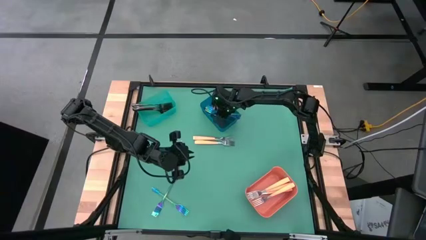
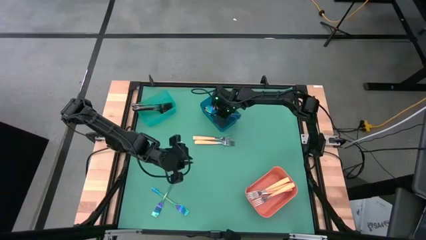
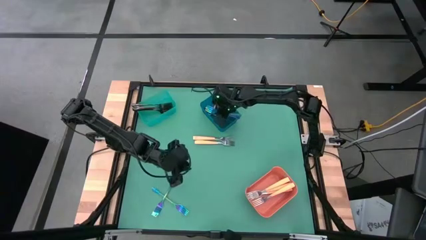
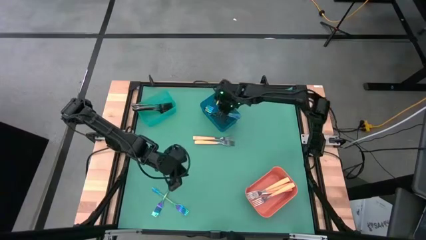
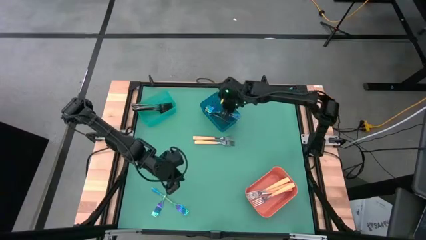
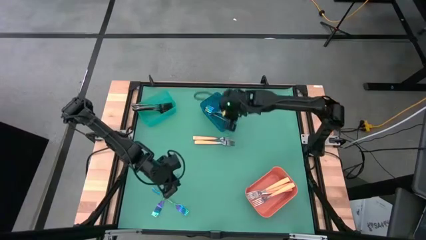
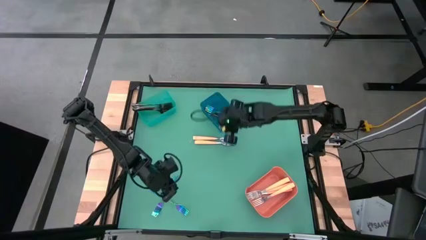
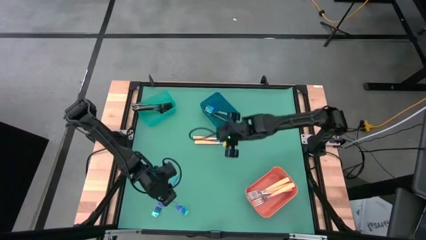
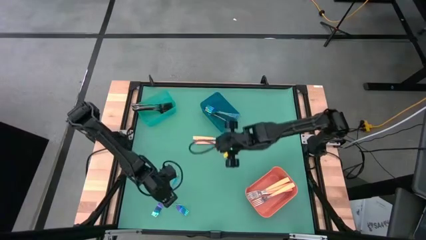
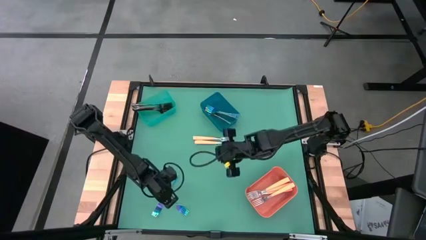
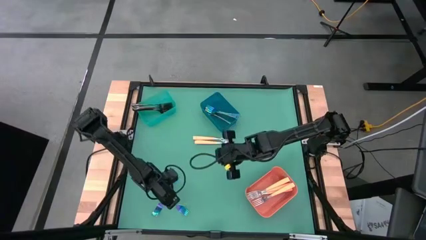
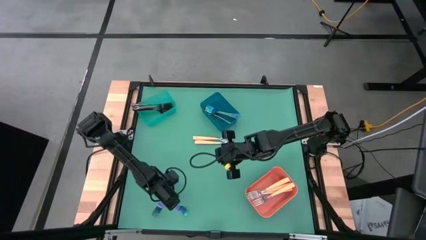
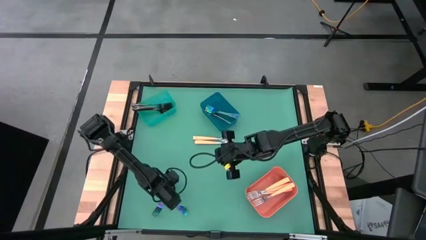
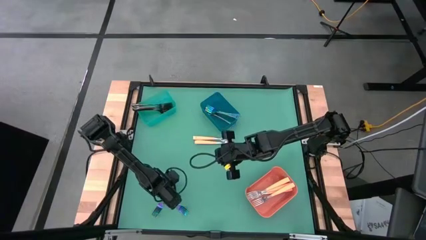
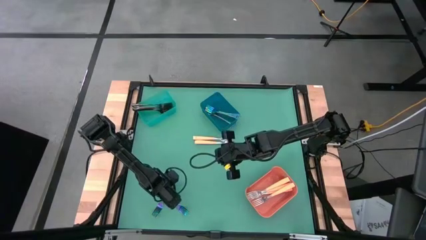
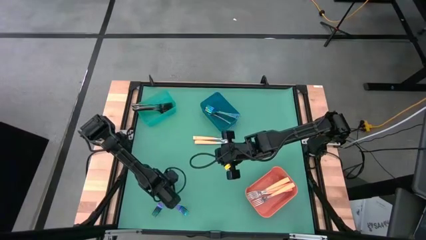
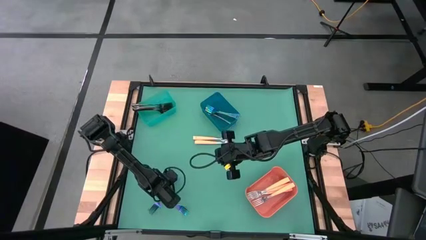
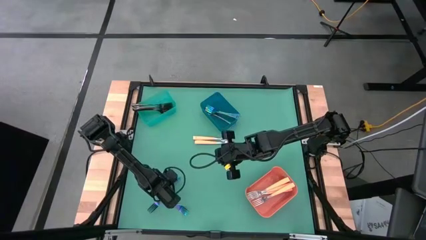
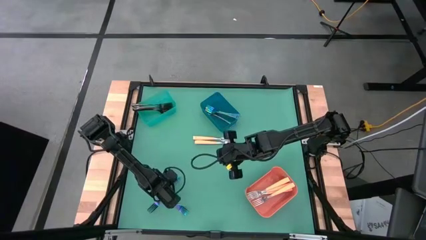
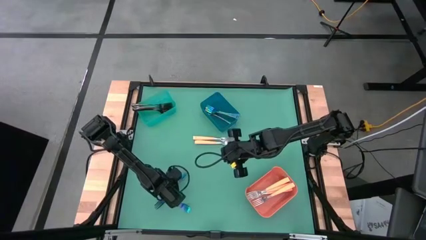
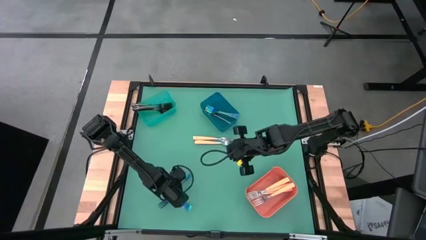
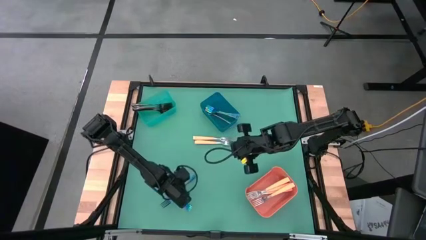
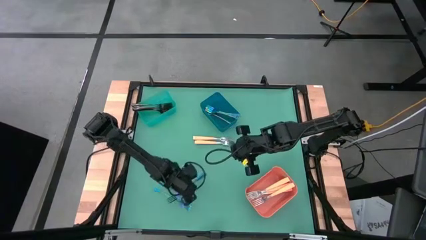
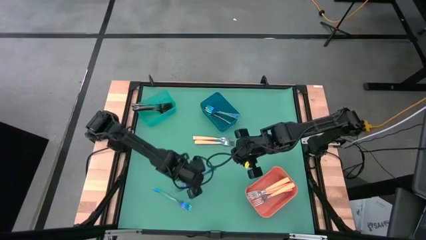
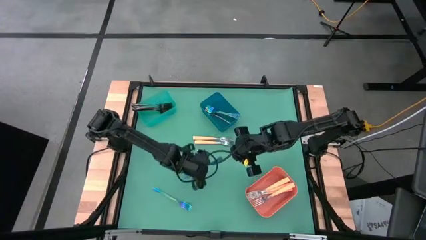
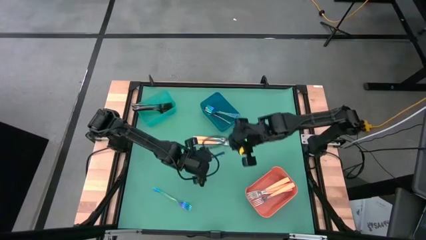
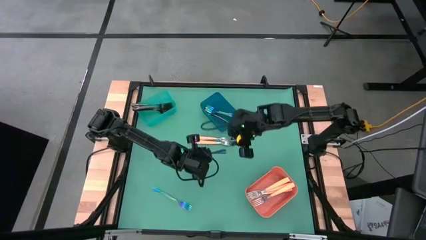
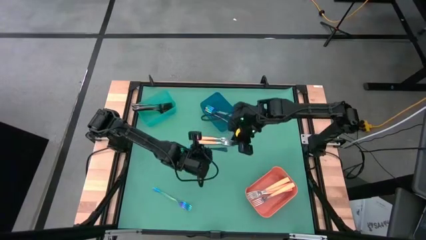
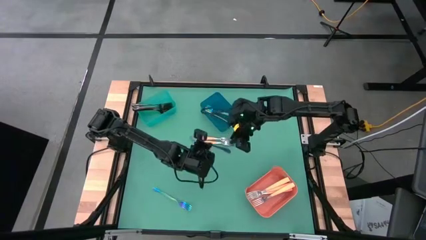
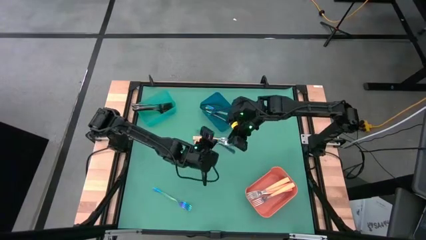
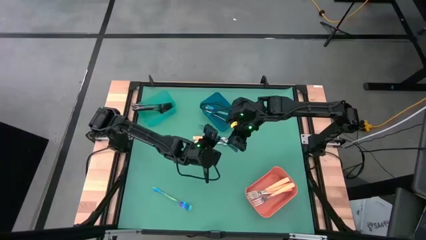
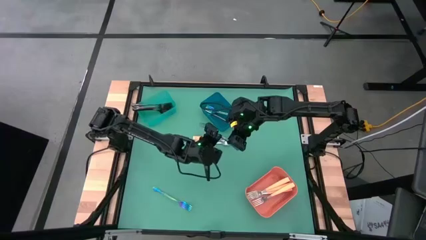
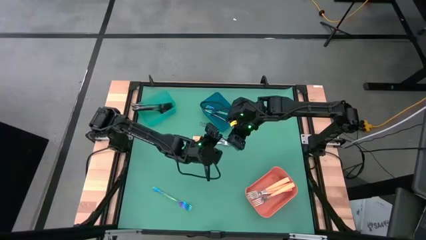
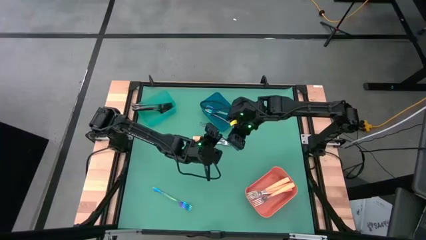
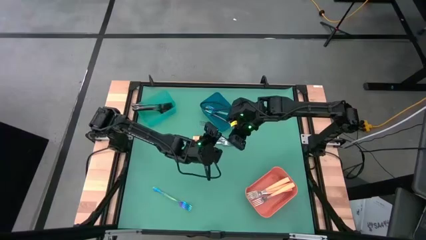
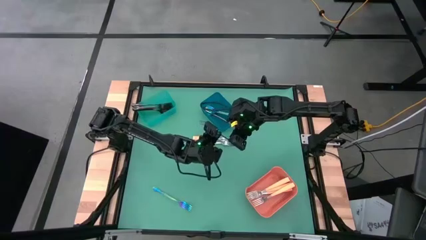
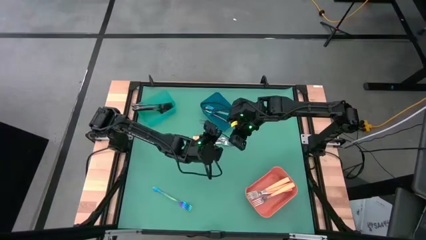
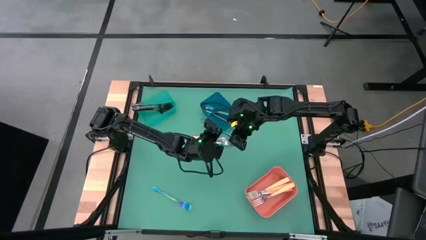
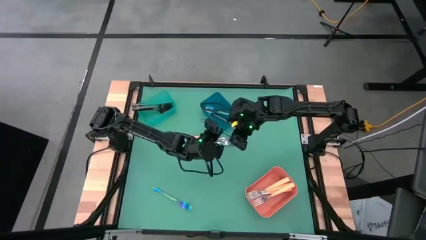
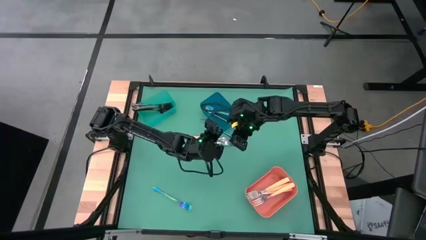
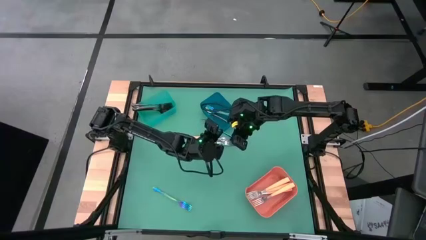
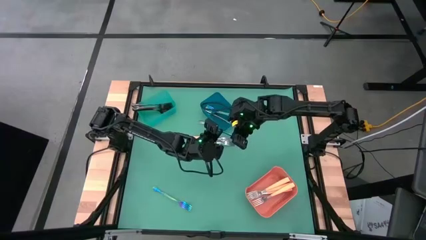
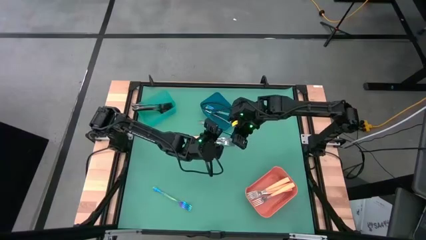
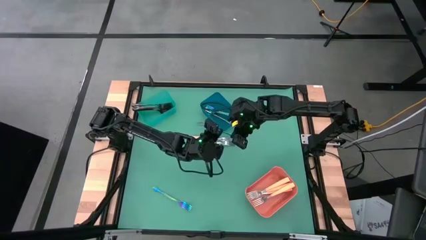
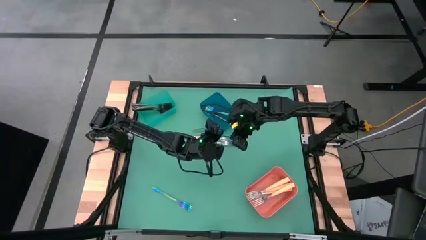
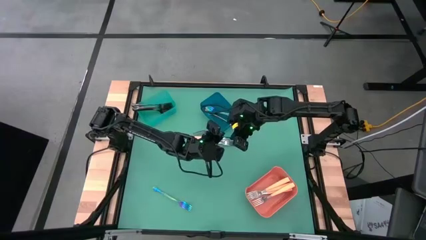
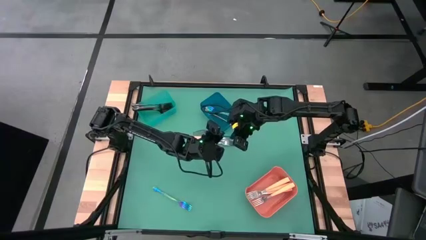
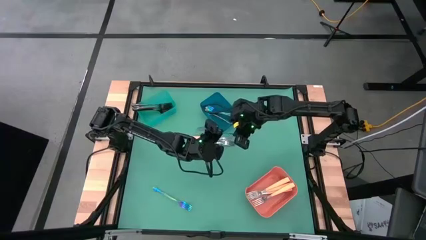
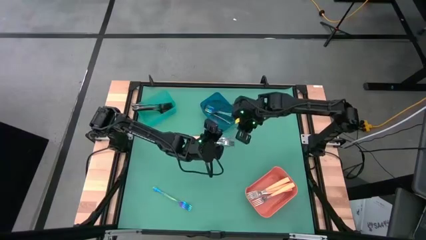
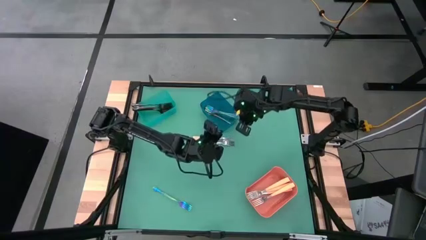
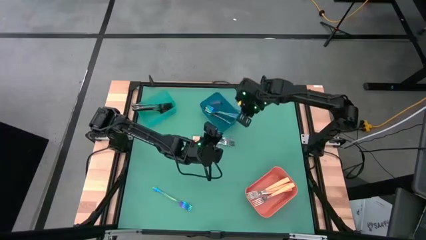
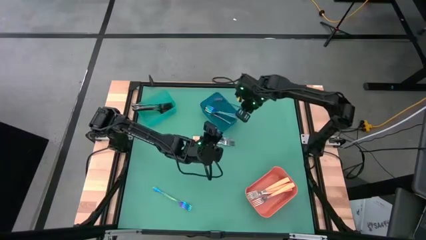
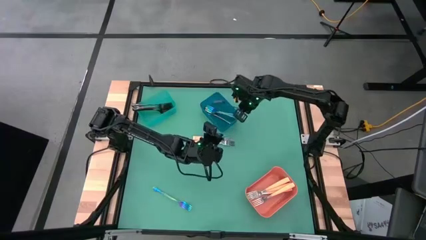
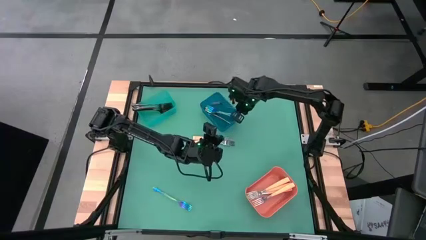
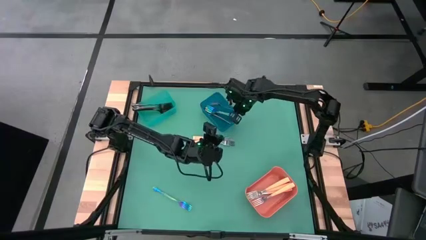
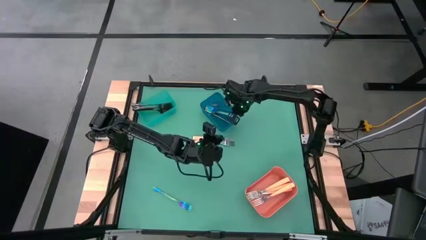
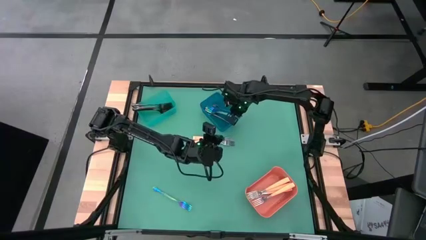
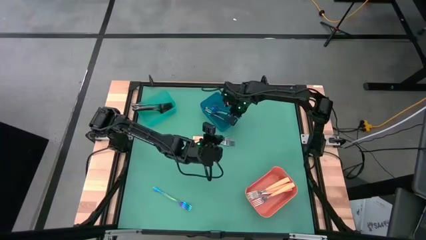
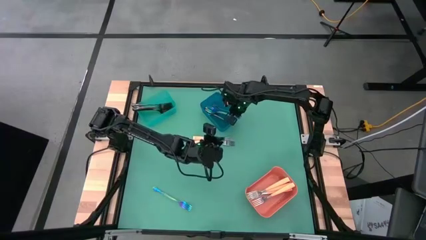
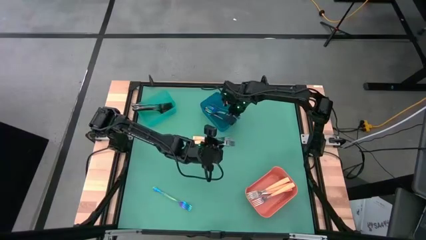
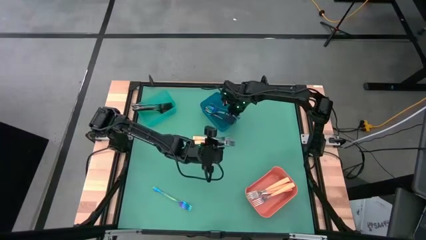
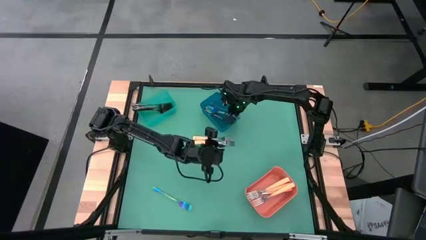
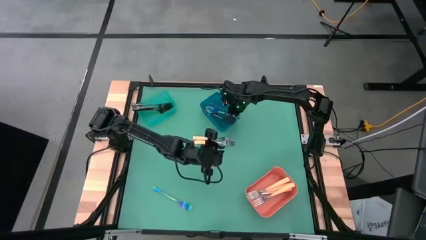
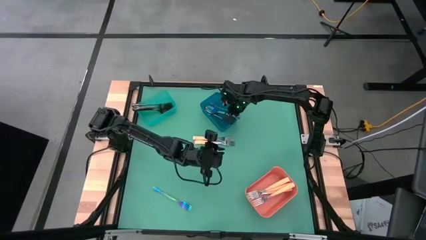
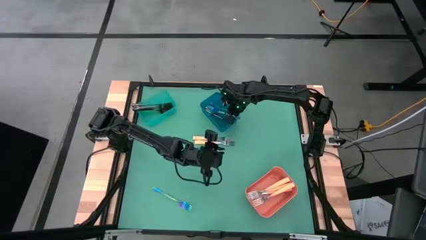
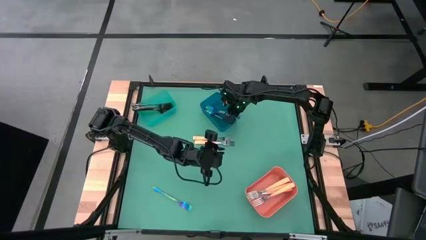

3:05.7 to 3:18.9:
Task: Sort silverware by color (type)
Put the purple fork into the blue bin

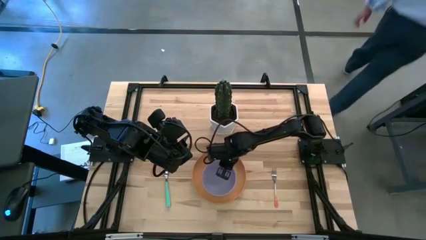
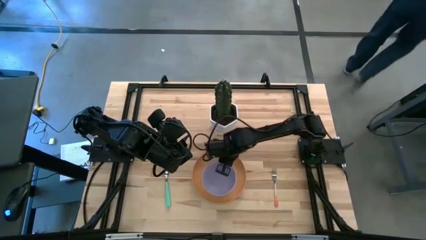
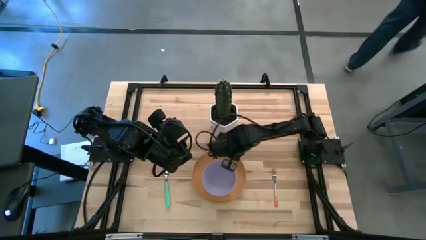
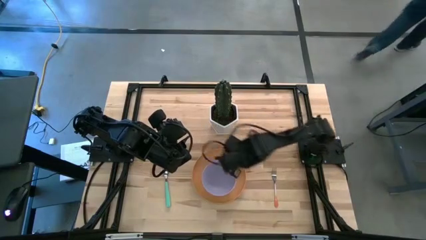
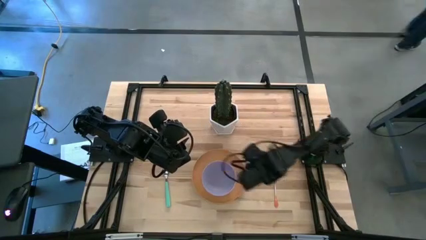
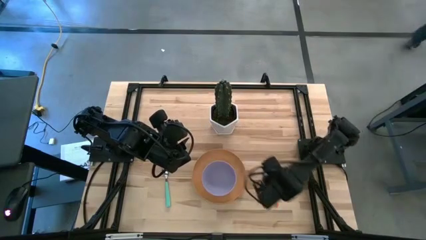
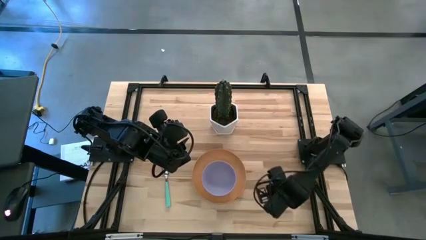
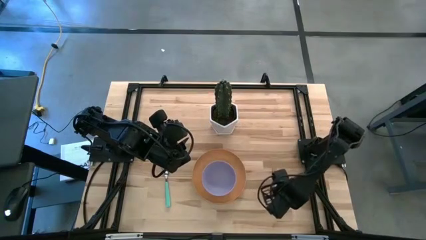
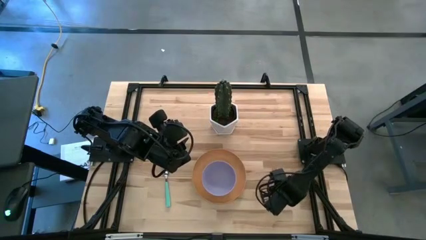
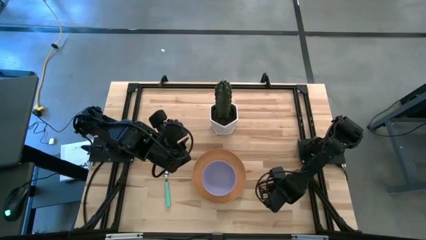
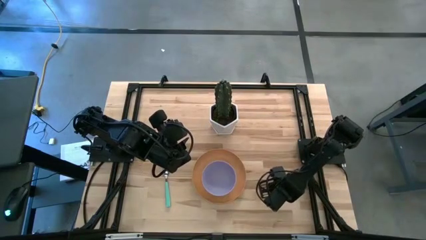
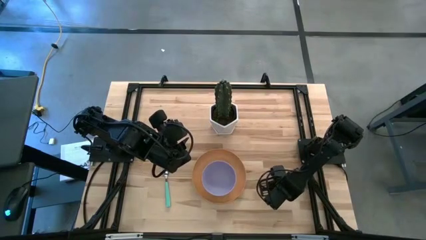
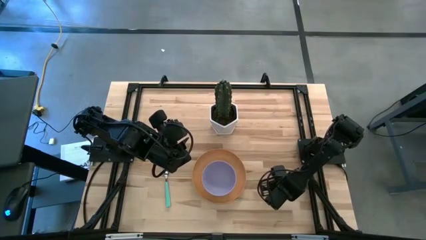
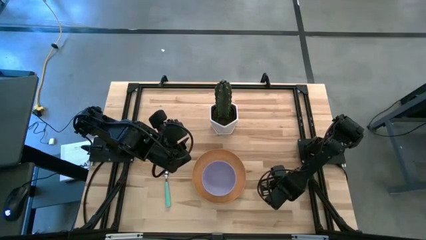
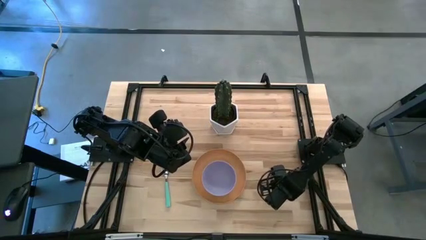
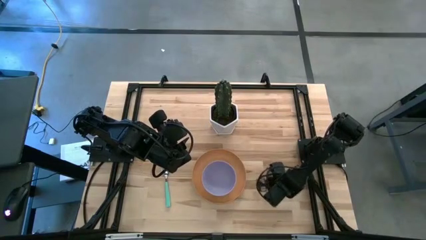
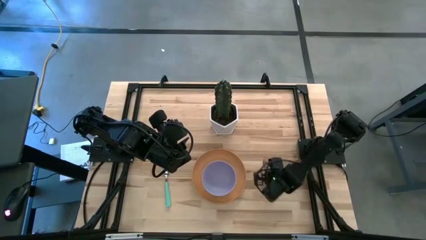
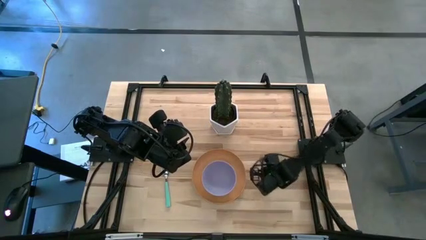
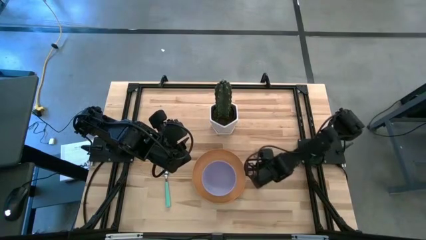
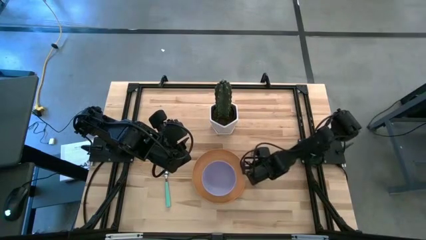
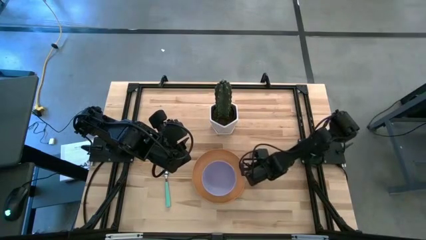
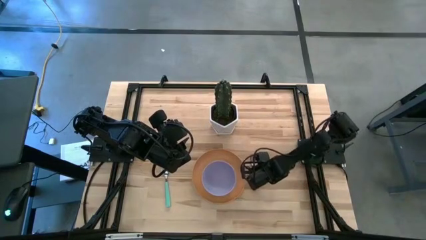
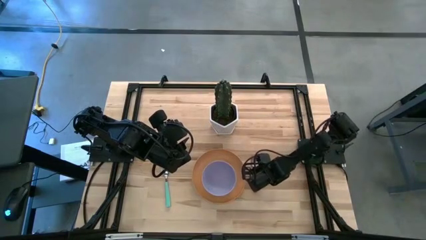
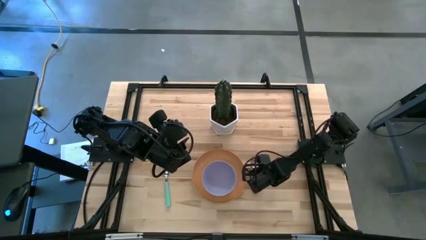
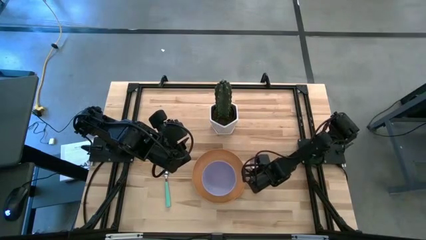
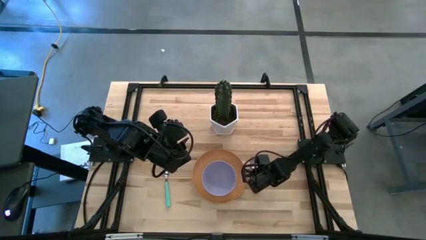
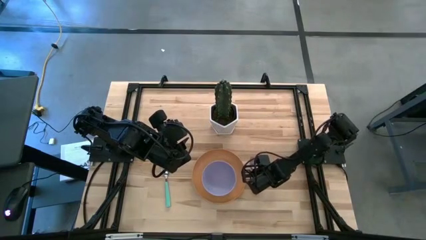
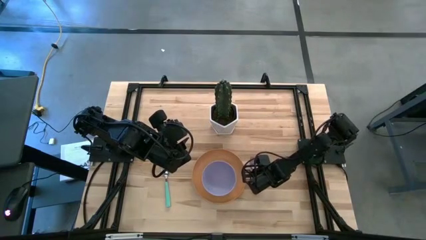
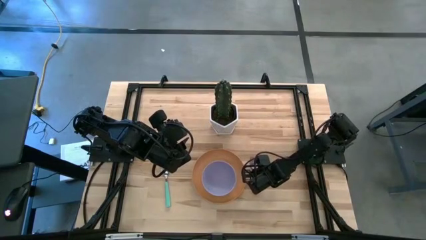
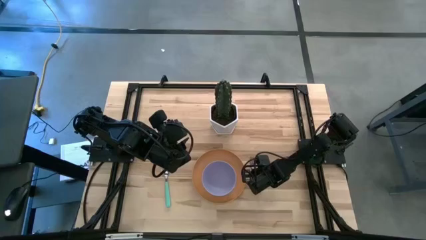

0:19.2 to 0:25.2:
Task: Set table place
Move the orange fork to the right side of the yellow plate
